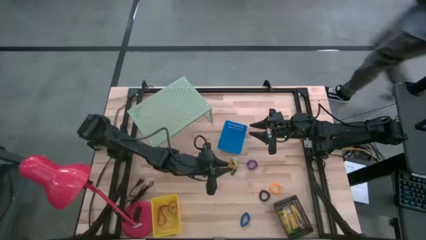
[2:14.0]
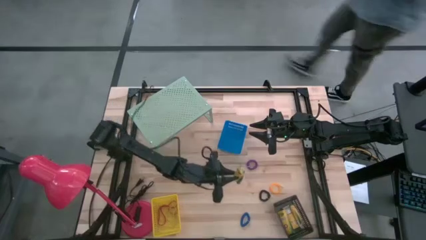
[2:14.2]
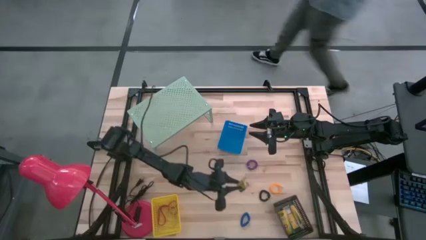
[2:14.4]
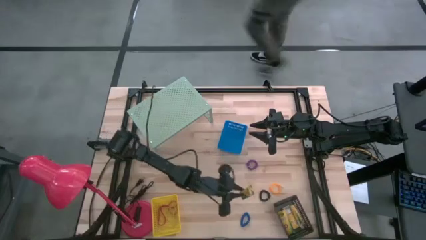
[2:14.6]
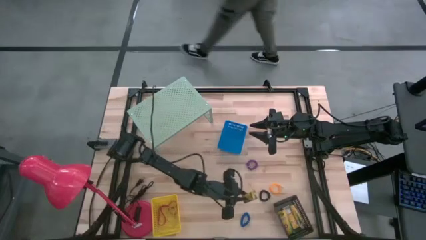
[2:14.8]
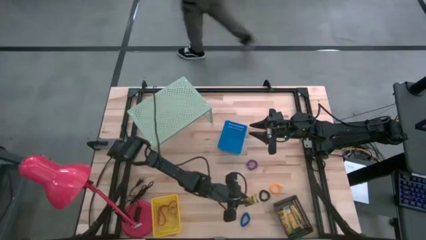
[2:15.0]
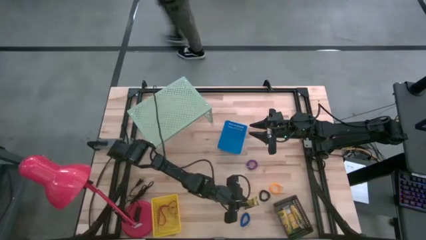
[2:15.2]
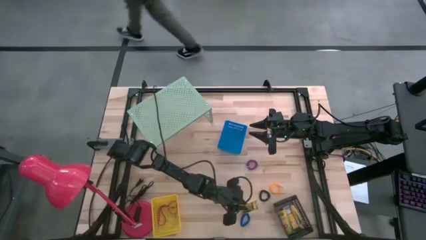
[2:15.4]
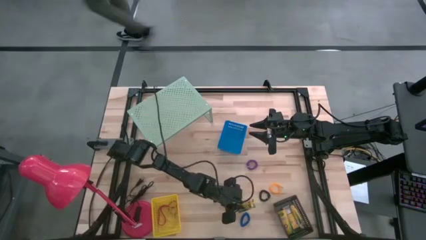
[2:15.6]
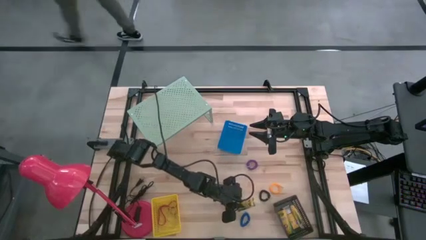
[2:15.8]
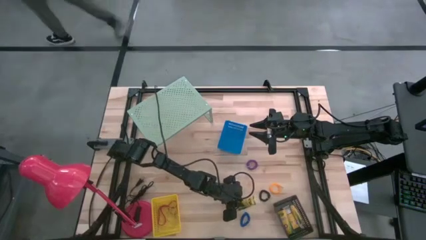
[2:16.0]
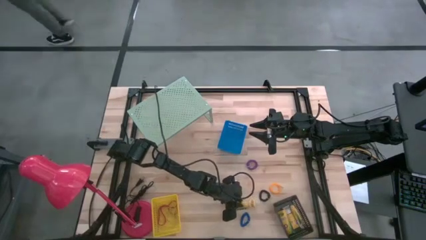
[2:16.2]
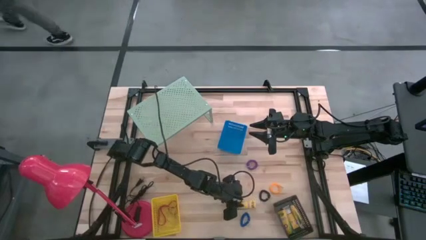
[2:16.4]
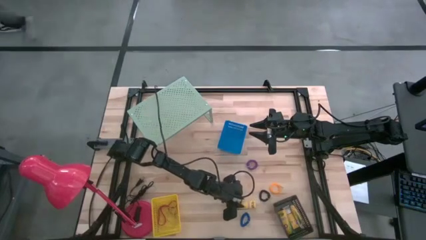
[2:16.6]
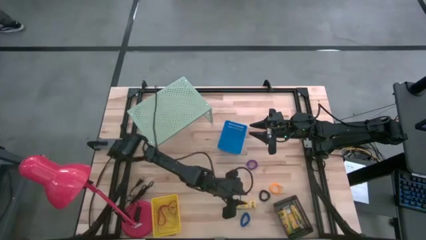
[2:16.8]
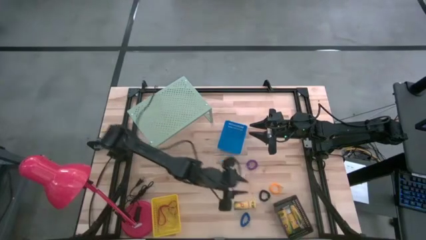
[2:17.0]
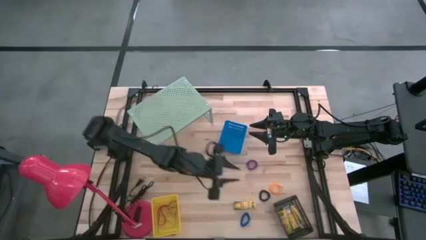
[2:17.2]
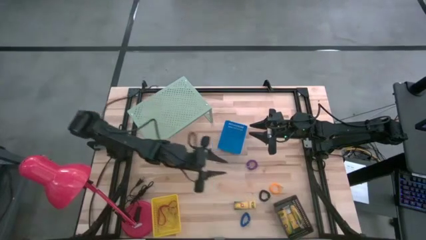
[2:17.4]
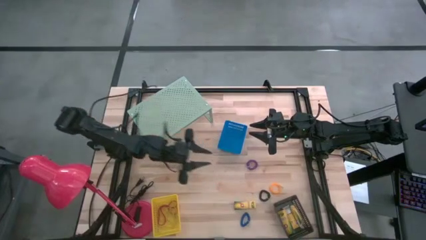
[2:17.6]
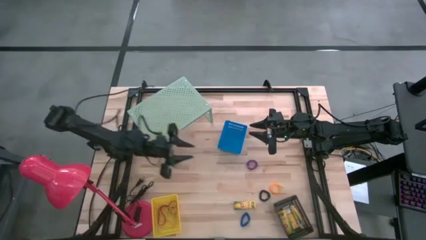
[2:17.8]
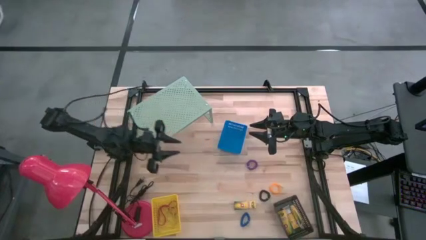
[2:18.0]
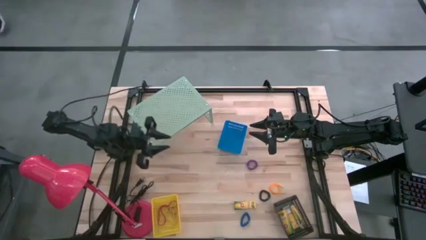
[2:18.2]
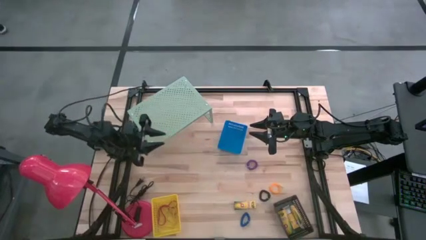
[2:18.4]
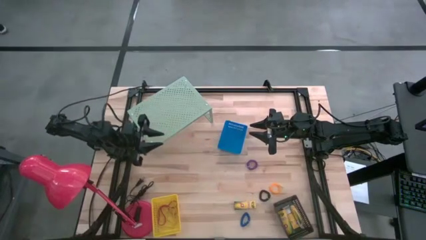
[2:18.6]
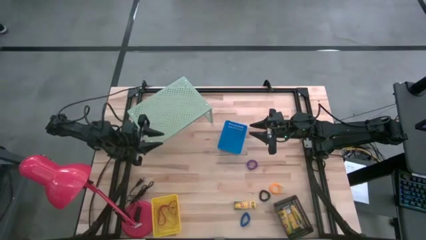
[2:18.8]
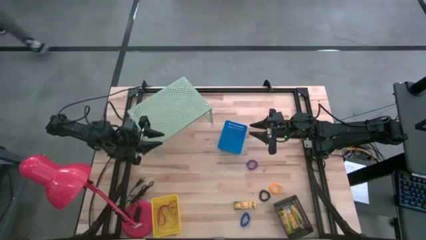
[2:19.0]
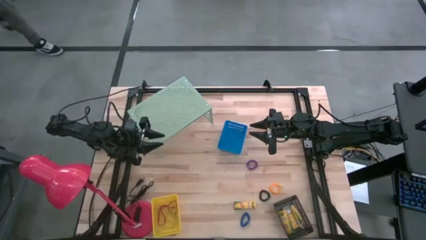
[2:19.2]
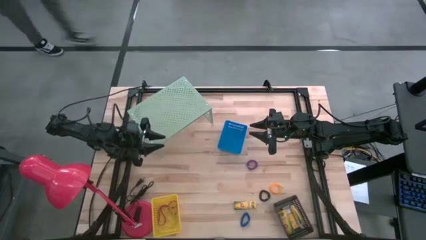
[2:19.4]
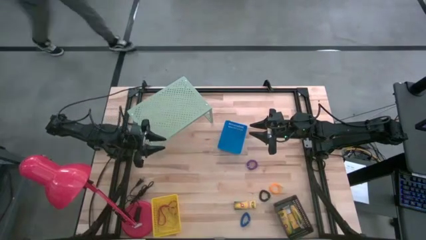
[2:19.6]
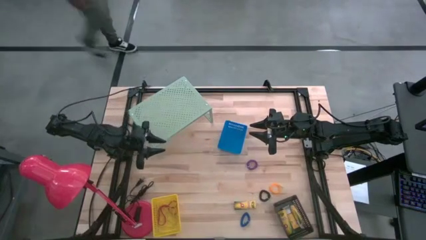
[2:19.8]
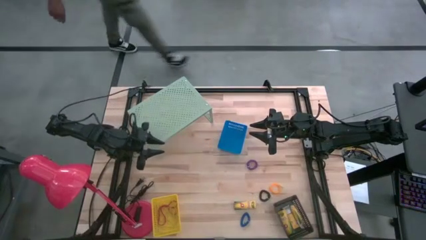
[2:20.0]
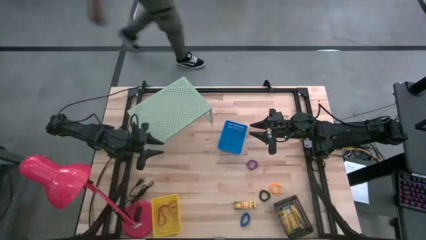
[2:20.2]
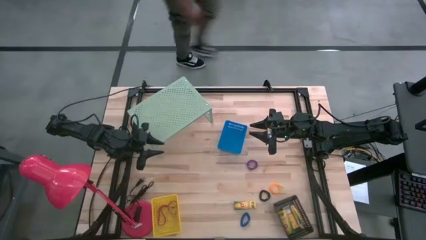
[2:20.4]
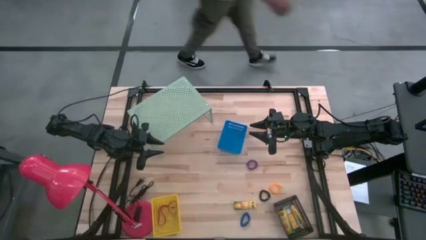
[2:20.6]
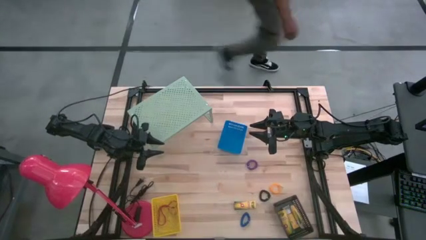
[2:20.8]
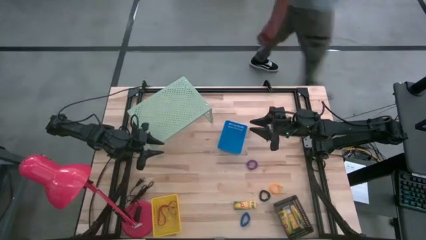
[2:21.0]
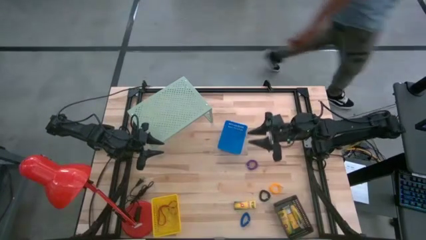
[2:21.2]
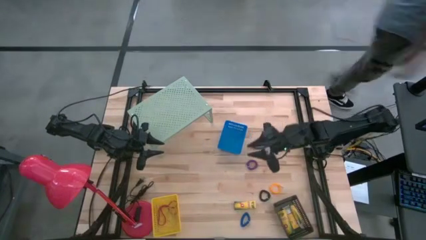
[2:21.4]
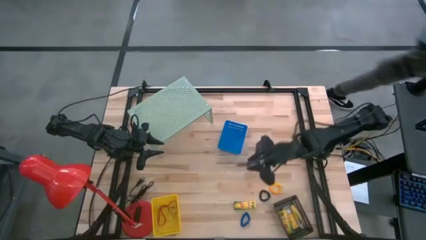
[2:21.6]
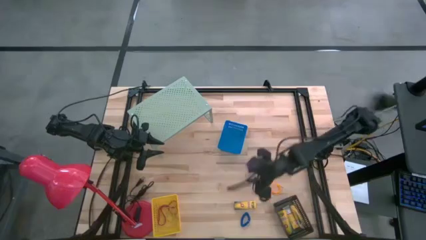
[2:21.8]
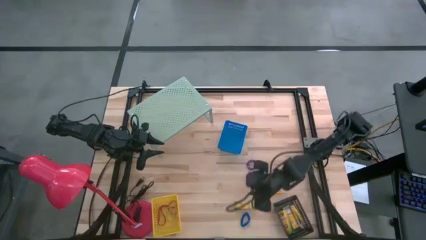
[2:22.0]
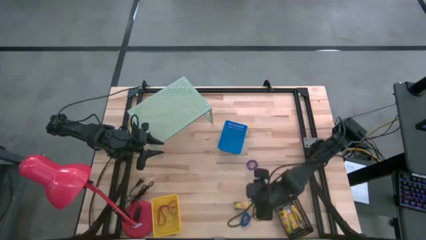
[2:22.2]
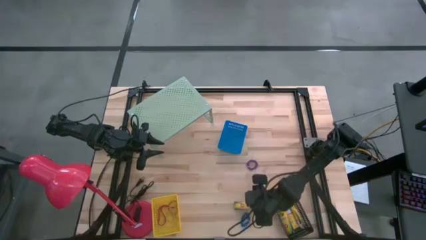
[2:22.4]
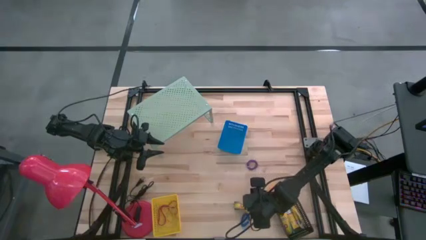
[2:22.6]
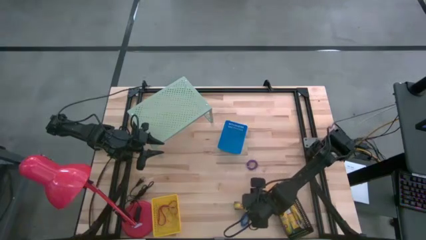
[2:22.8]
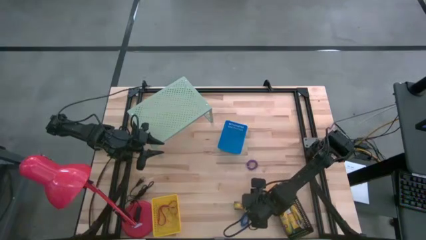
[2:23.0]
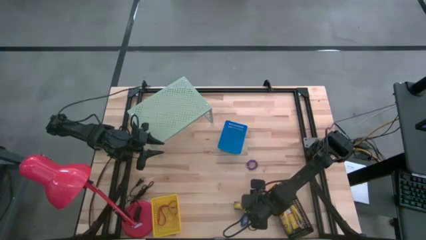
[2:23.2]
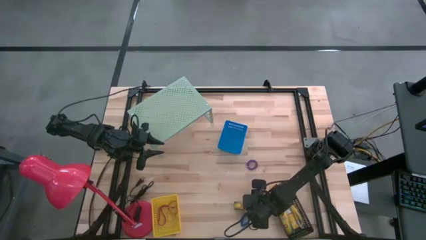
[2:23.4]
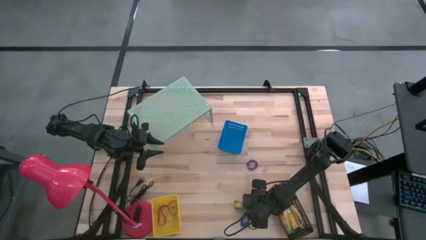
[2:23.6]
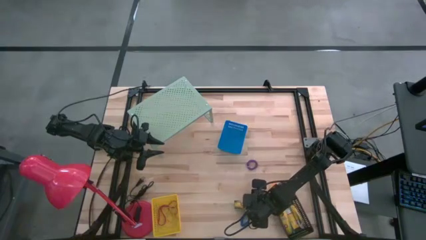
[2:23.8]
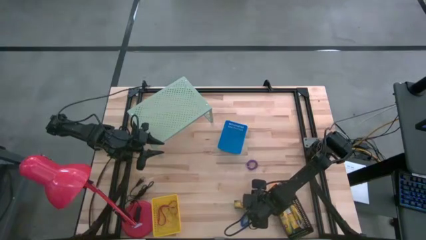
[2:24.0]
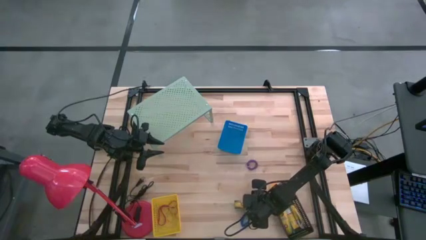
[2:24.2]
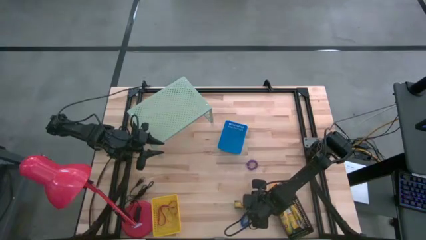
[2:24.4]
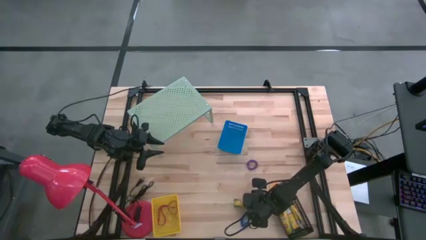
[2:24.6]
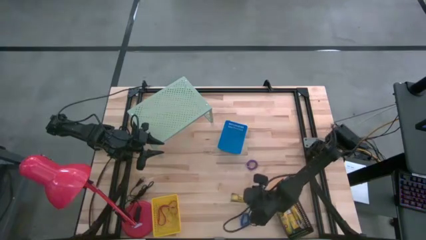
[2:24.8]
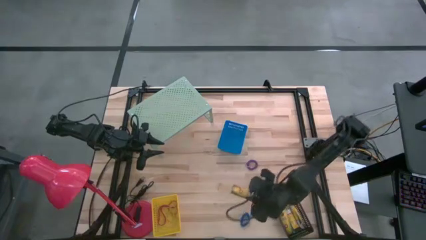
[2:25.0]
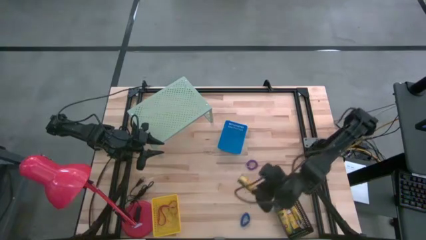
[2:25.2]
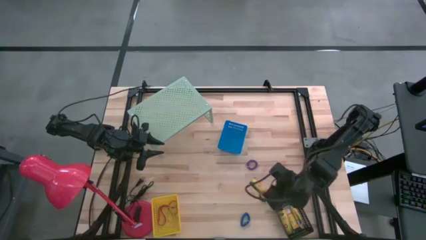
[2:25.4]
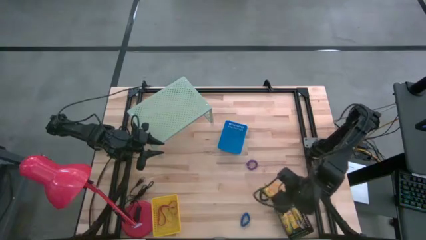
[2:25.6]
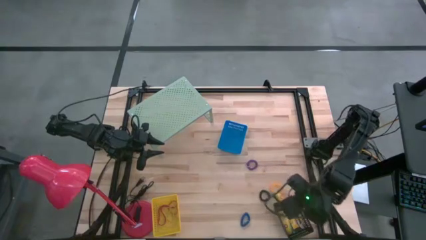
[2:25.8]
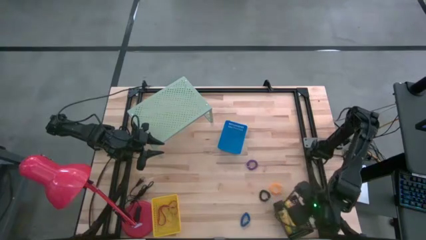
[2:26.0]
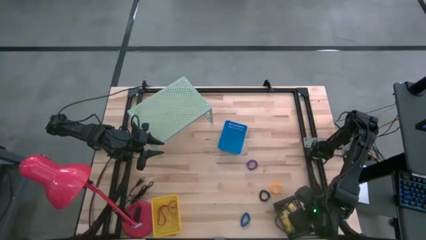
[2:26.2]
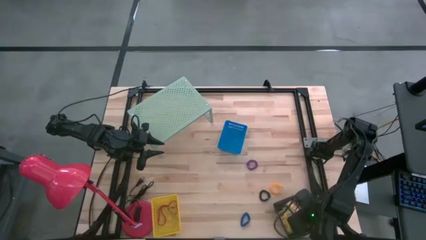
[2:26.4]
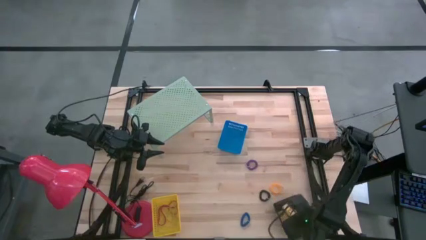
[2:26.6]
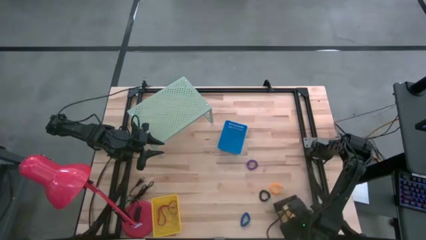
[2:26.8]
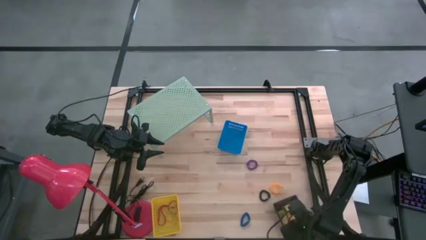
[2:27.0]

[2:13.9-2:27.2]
Task: Pick & Place Office Desk Supplies
Put the crayon into the black basket

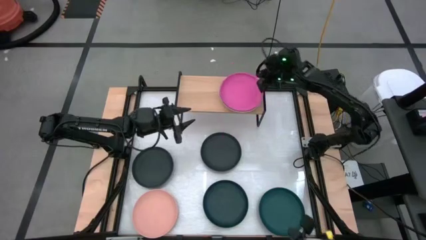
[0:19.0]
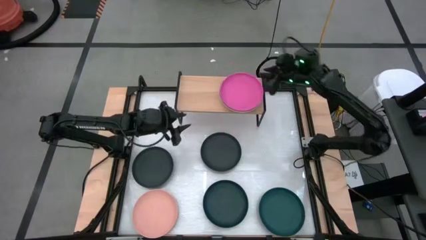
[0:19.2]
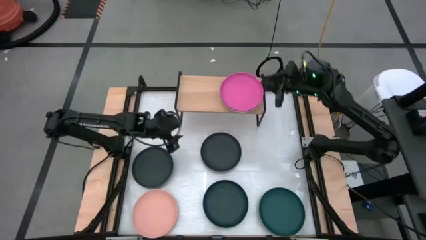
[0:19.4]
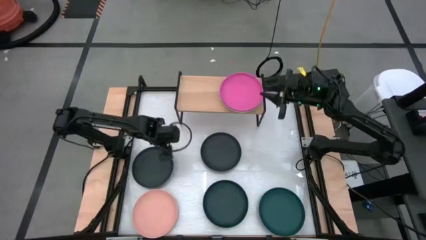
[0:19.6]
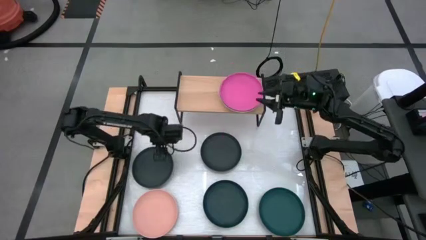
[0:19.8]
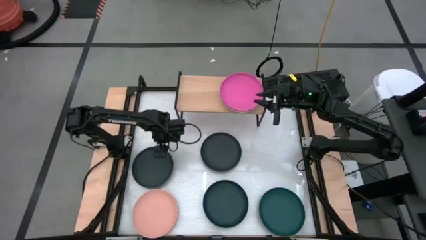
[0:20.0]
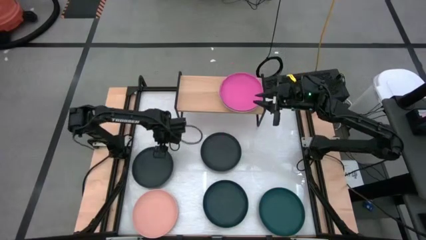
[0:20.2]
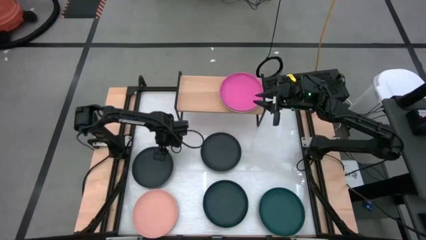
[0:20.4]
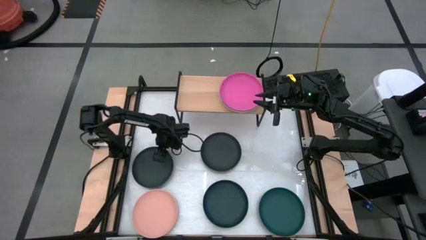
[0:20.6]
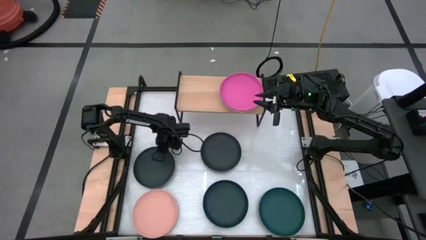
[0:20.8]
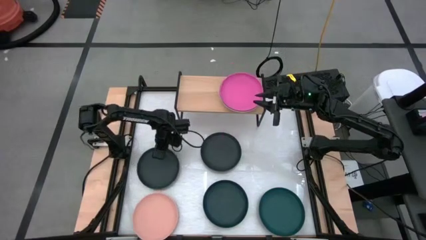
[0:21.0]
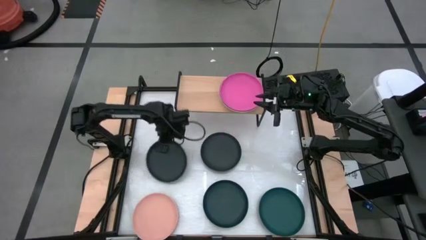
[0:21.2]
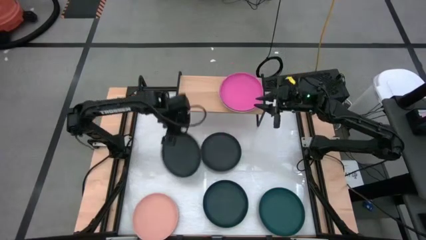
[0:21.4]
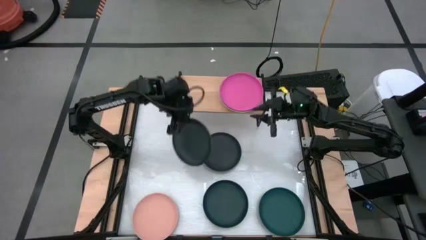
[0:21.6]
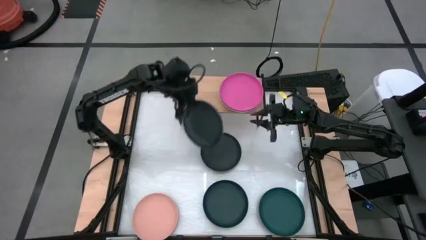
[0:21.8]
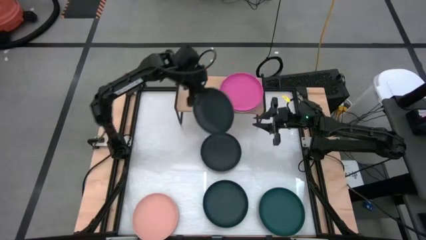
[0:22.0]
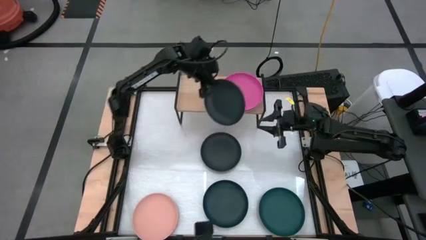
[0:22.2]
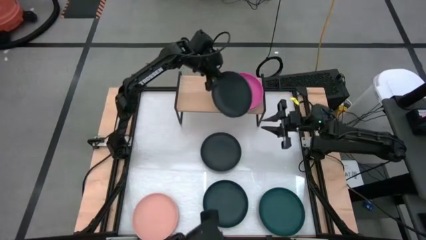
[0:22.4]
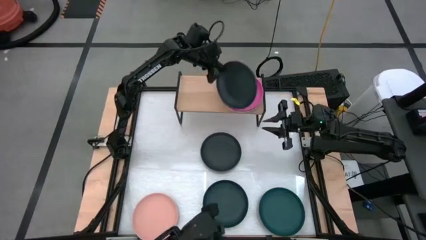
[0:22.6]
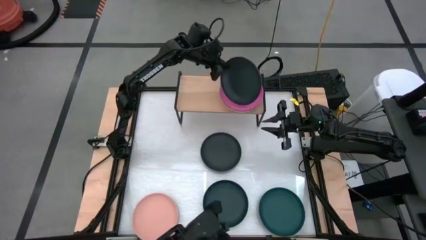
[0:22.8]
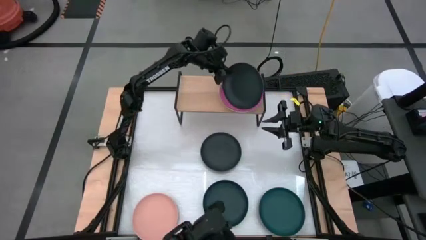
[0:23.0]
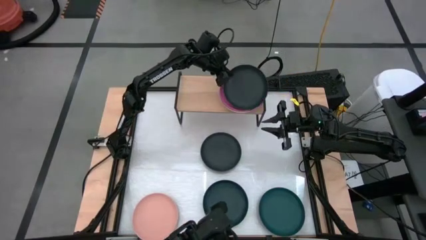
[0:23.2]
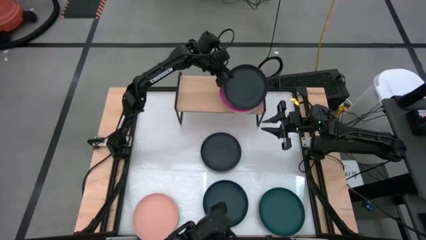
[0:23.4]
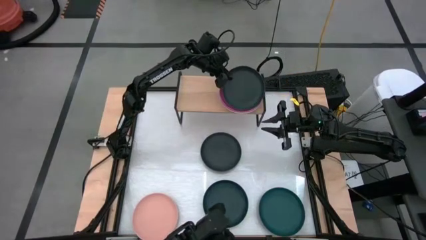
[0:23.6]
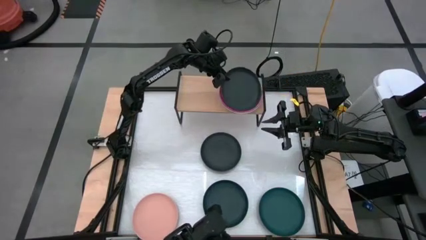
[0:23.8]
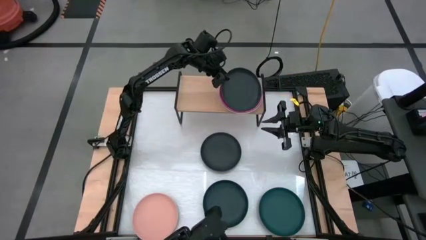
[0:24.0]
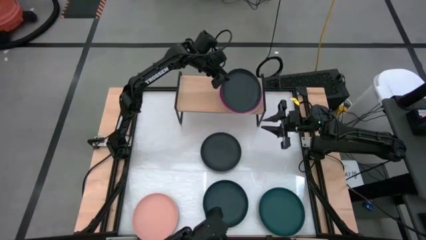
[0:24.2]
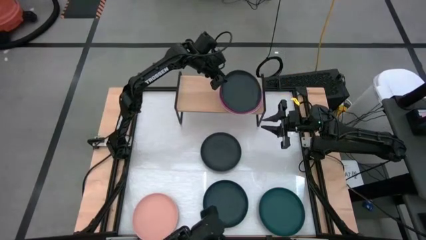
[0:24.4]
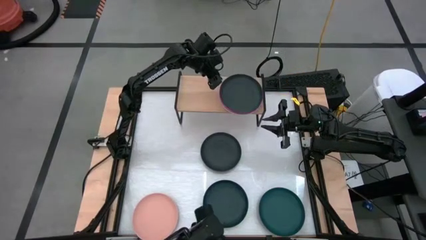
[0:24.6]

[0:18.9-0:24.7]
Task: Place and stack plates onto a shelf
Stack the top left black plate on top of the pink plate on the shelf
